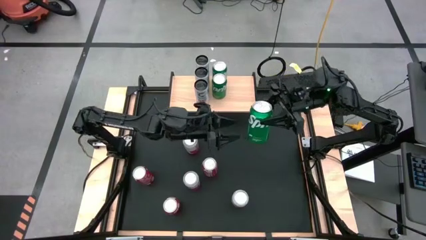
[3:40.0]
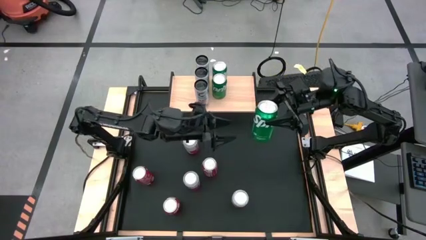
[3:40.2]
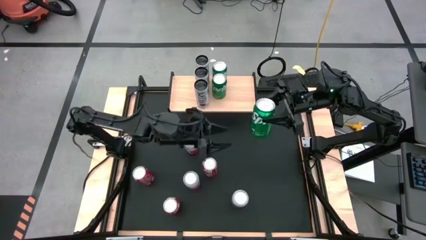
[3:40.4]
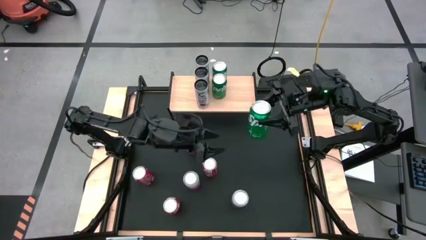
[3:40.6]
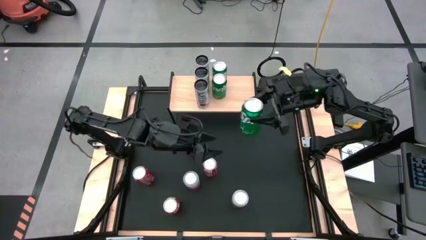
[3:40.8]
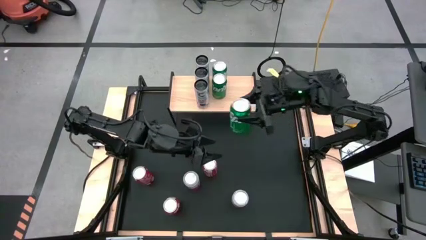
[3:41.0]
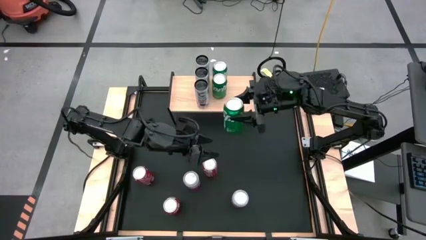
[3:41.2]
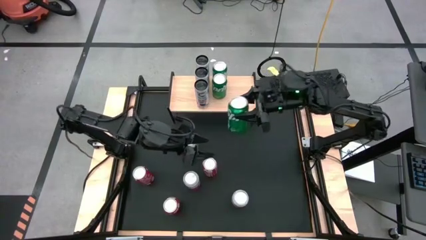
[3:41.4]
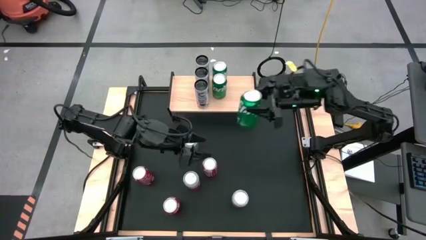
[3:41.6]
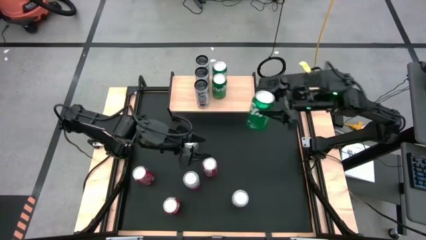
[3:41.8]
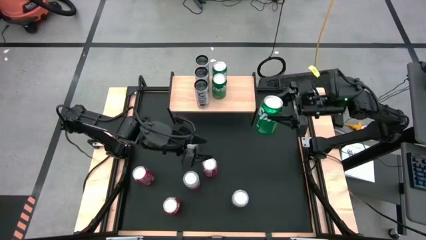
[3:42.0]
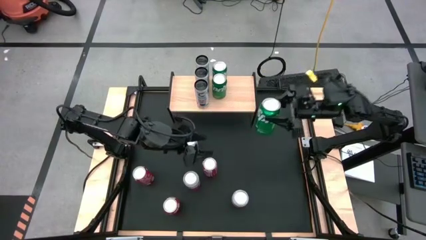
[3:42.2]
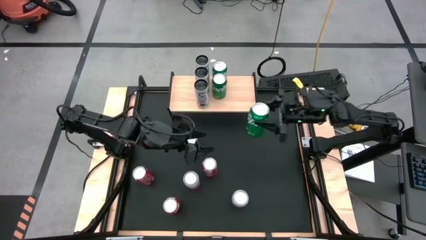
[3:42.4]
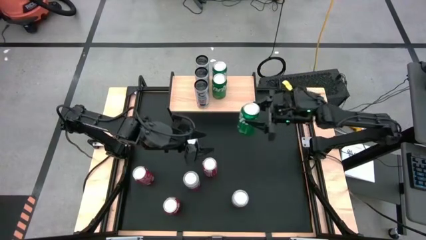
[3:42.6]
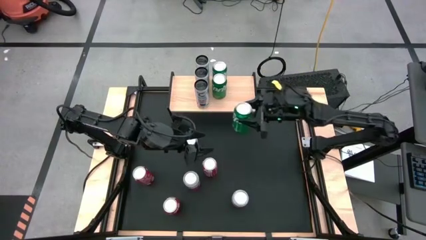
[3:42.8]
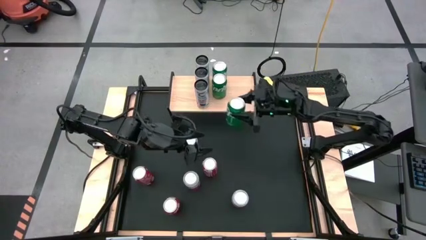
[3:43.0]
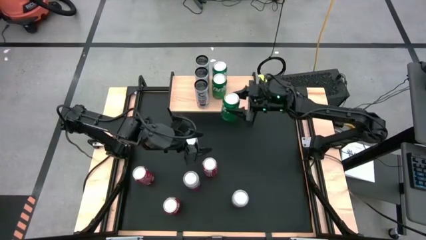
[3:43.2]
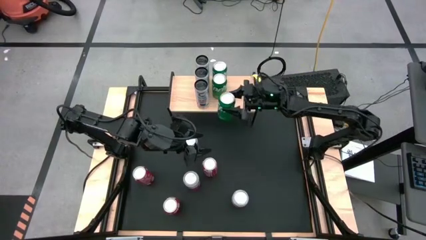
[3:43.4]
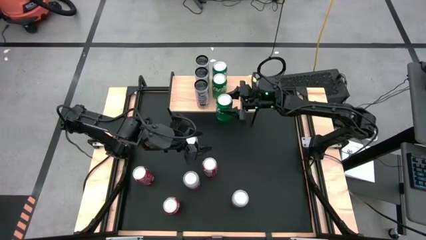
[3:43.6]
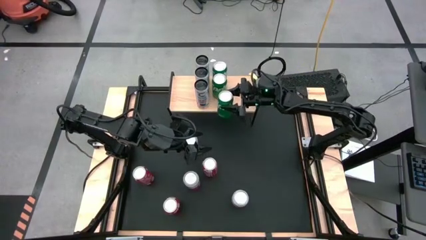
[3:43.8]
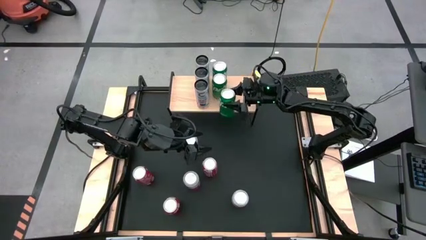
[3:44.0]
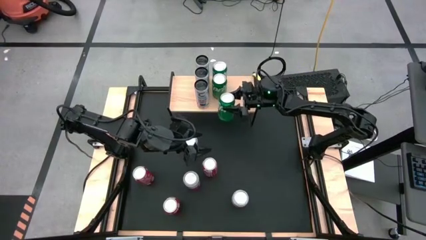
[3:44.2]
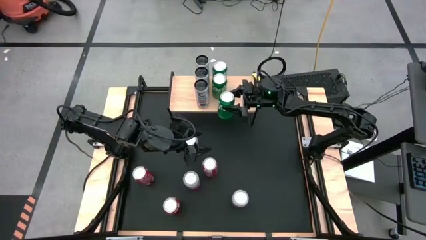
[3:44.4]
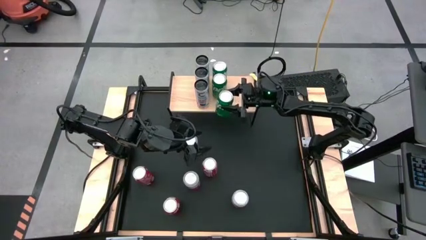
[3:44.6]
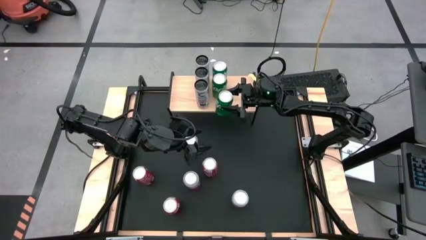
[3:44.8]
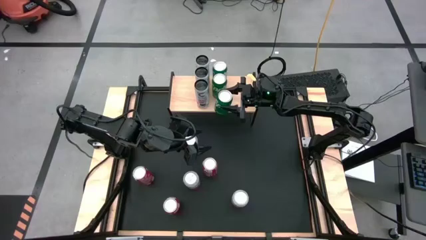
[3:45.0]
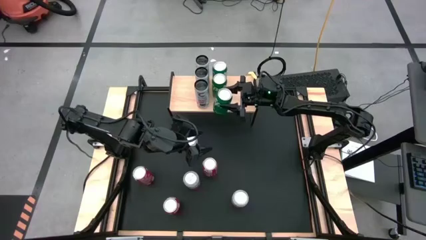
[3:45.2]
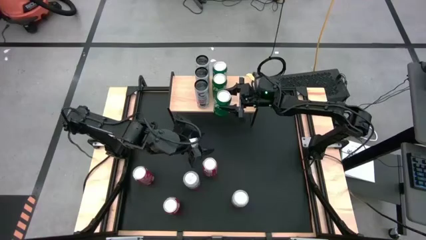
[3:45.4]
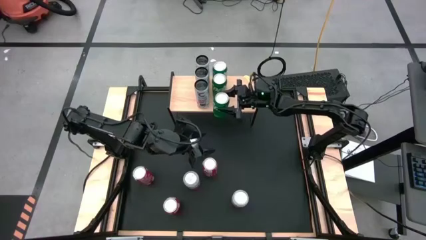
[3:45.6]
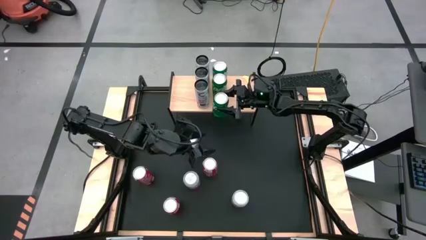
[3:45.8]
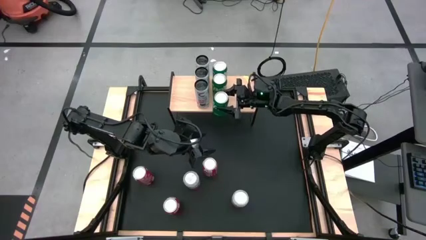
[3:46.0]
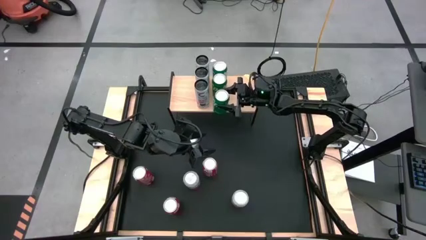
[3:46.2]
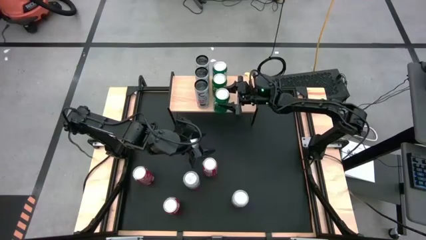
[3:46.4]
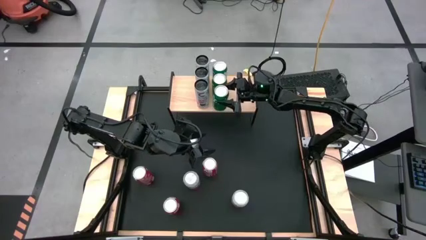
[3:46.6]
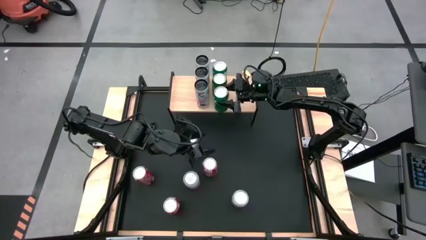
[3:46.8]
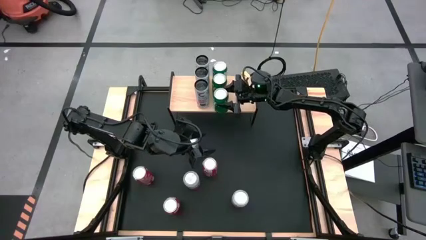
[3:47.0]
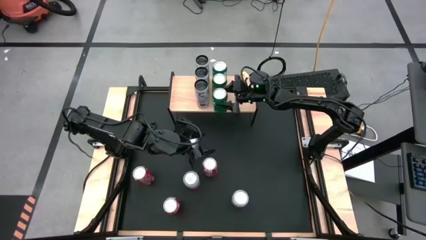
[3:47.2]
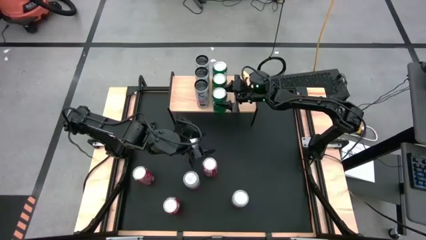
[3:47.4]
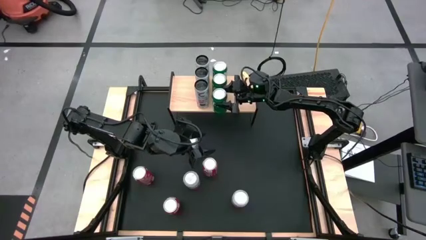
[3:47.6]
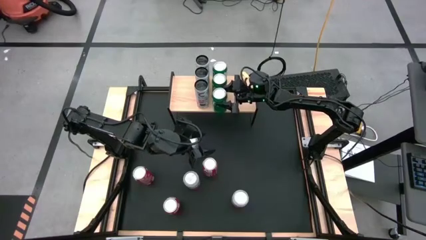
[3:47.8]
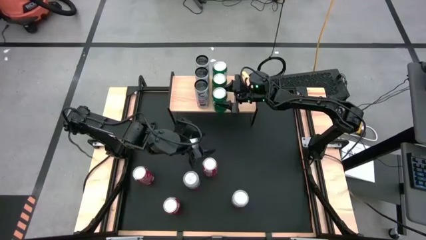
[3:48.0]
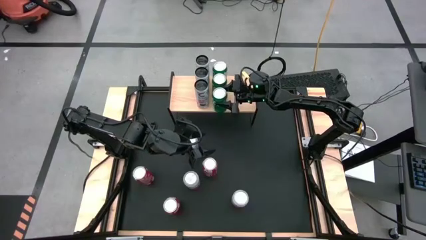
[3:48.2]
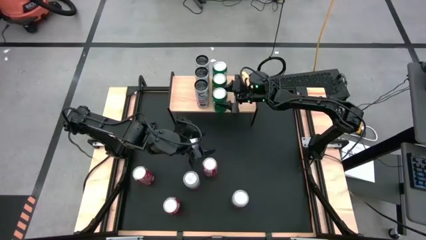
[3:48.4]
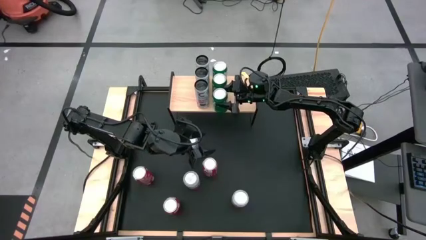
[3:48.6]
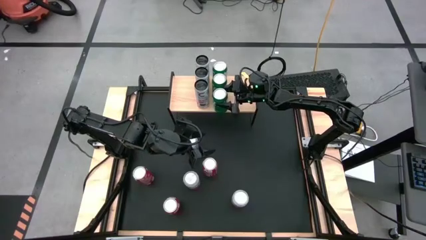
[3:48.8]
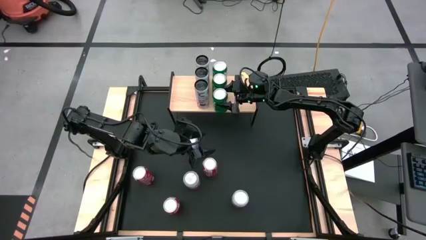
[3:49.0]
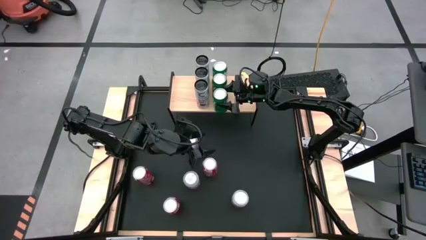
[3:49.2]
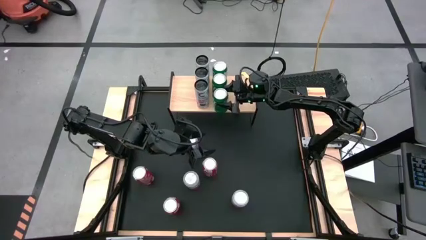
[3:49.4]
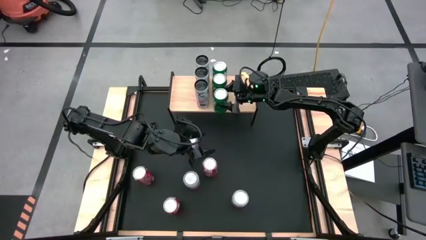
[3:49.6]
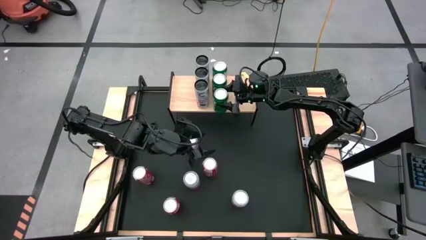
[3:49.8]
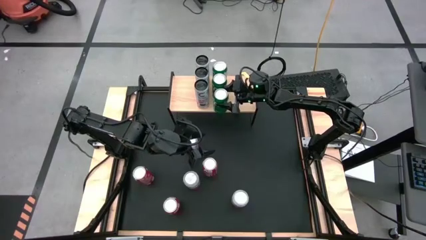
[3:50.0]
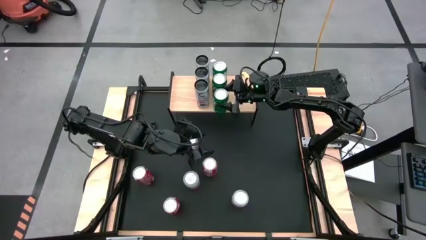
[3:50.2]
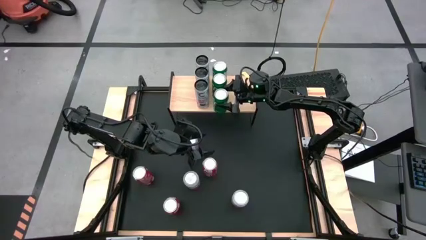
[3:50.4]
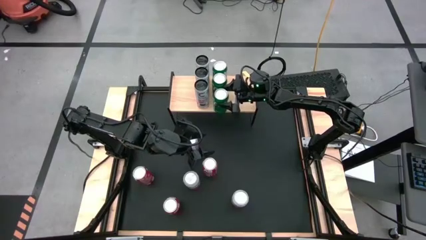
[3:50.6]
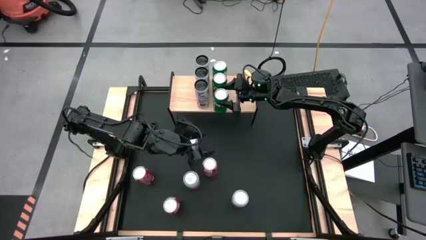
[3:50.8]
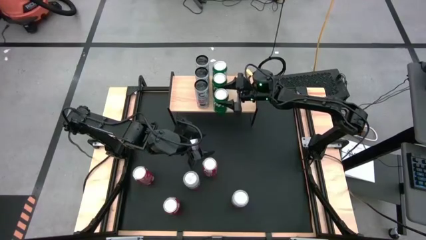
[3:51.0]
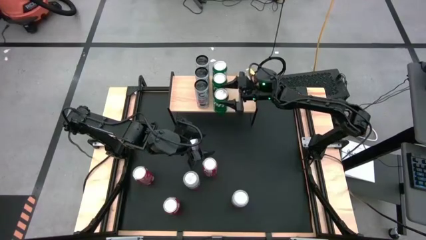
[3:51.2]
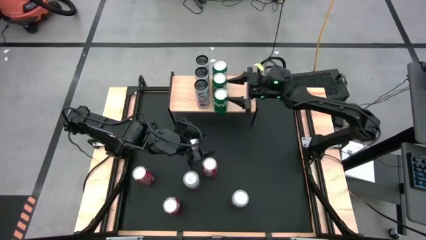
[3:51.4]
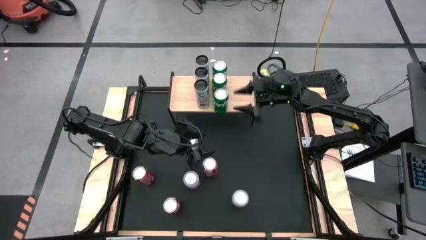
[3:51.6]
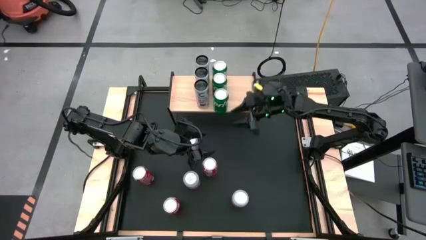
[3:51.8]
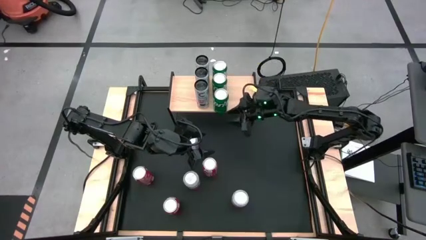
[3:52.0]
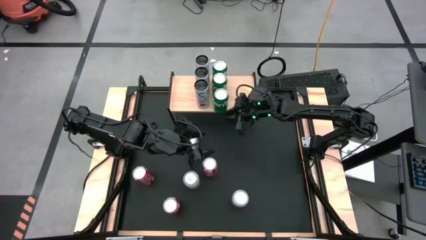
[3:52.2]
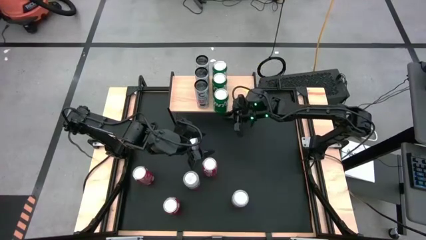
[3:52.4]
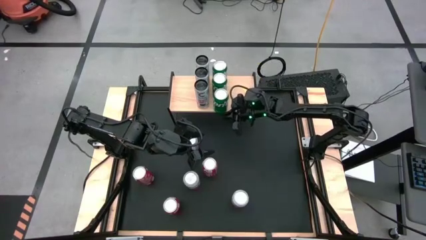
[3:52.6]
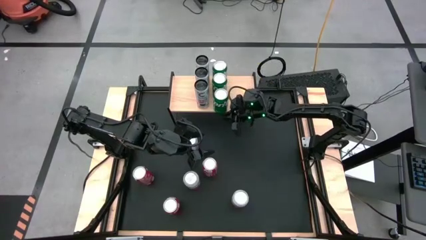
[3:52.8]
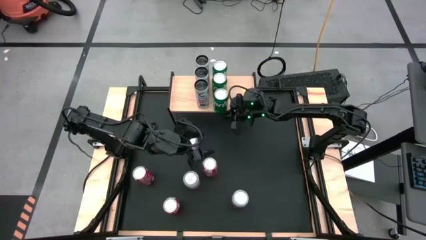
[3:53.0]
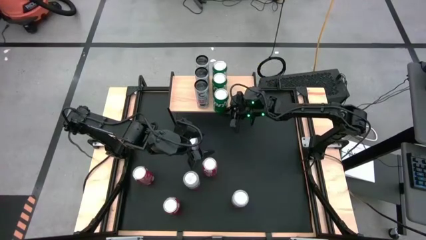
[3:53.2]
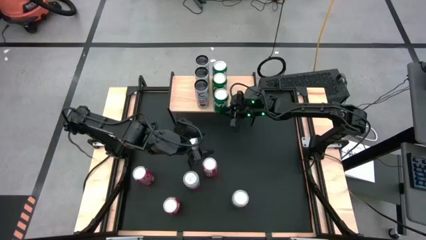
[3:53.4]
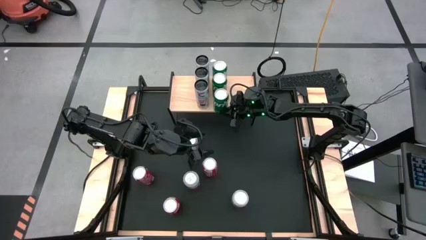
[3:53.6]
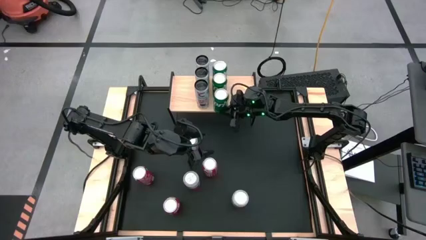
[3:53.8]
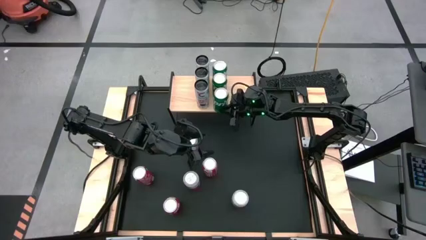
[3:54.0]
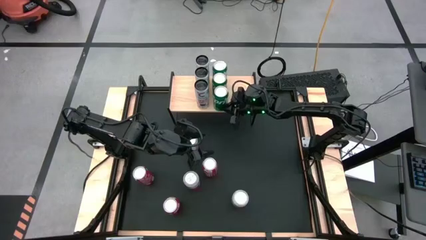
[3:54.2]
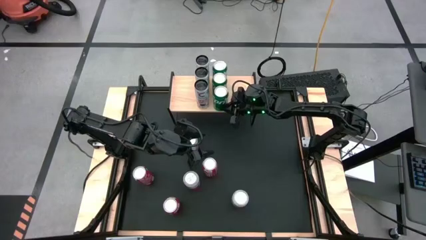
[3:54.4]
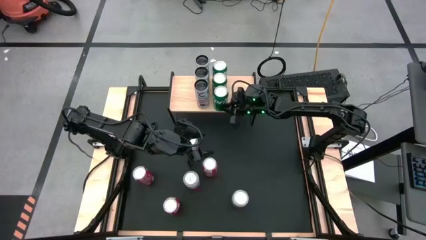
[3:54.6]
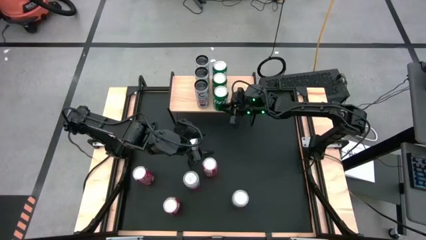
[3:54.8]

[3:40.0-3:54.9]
Task: Place canned beverage on shelf
Put the green soda can aligned with the other green soda can on the shelf
